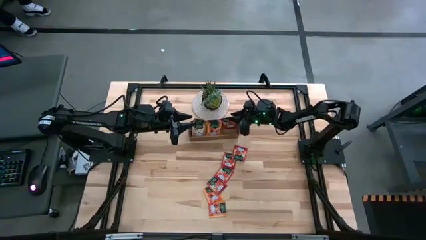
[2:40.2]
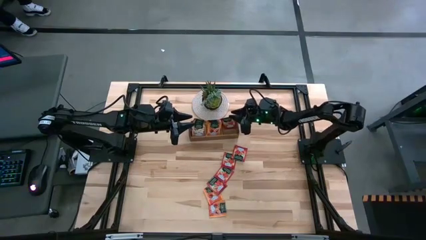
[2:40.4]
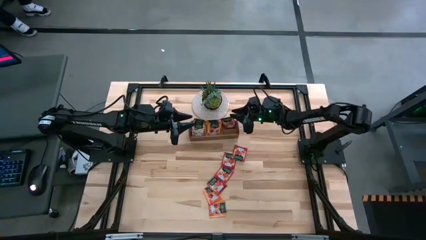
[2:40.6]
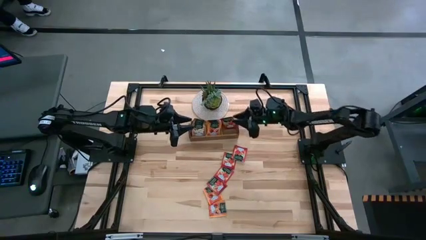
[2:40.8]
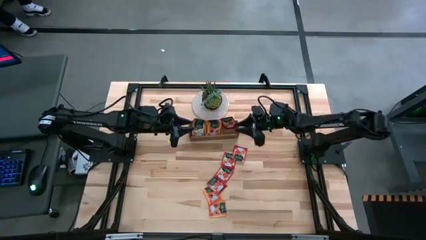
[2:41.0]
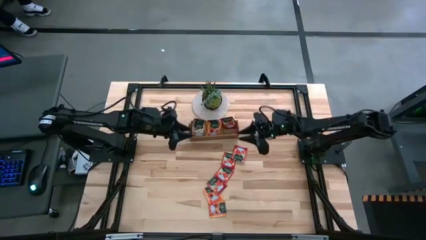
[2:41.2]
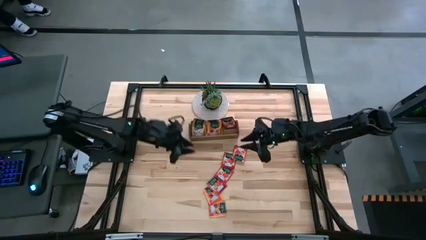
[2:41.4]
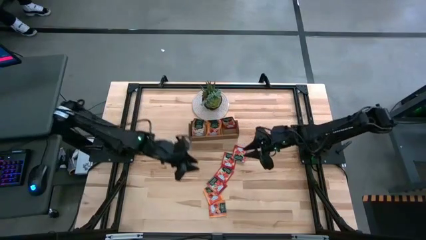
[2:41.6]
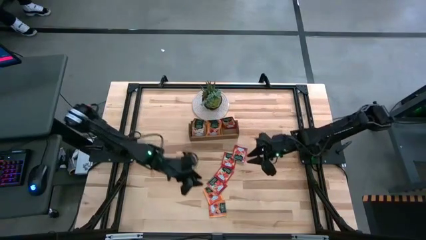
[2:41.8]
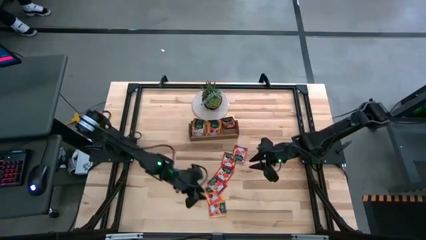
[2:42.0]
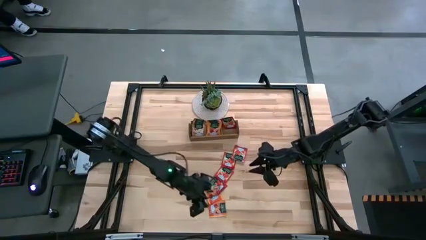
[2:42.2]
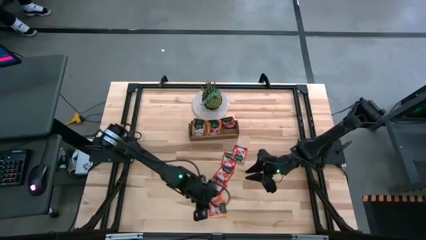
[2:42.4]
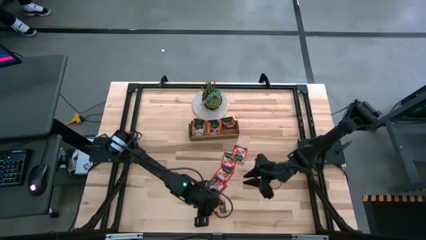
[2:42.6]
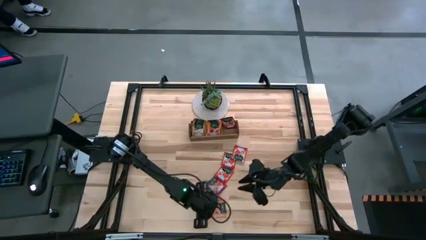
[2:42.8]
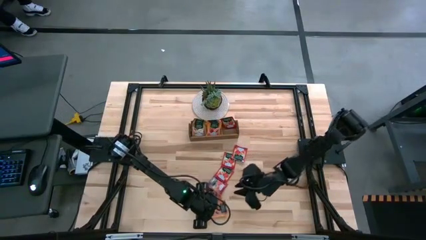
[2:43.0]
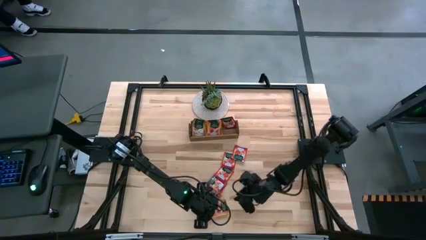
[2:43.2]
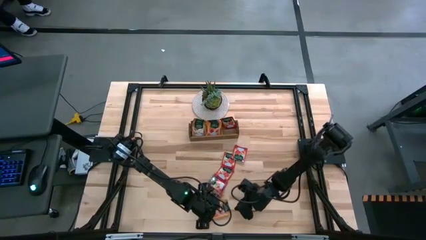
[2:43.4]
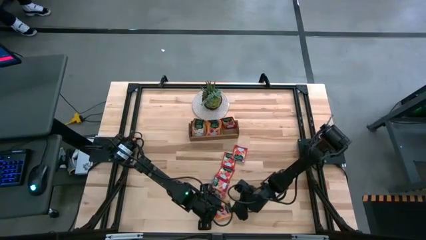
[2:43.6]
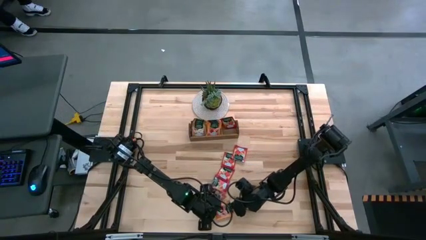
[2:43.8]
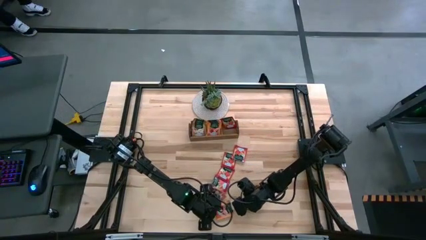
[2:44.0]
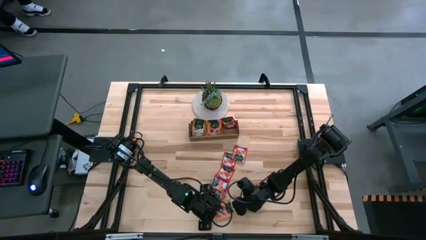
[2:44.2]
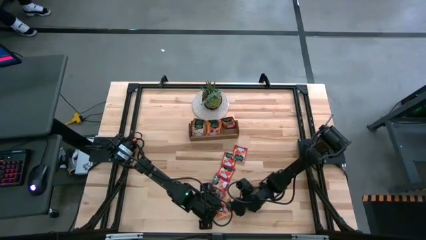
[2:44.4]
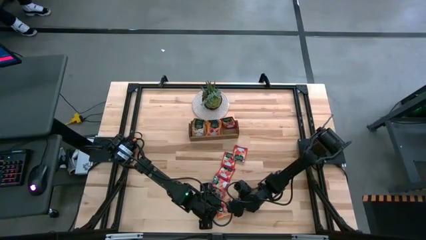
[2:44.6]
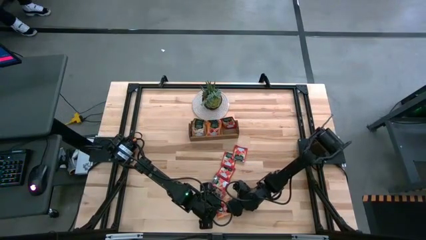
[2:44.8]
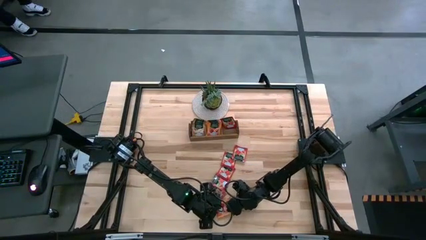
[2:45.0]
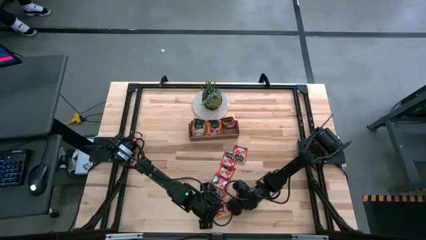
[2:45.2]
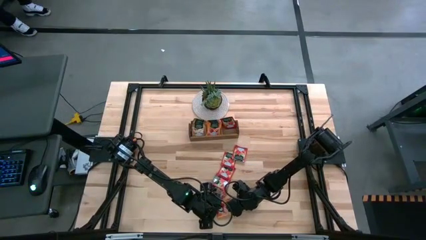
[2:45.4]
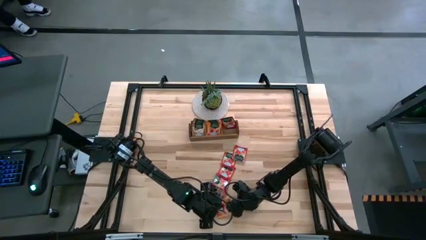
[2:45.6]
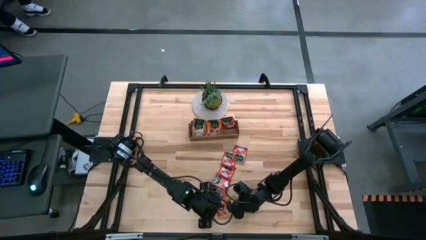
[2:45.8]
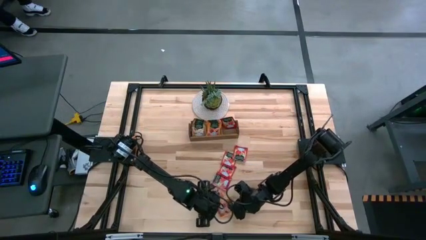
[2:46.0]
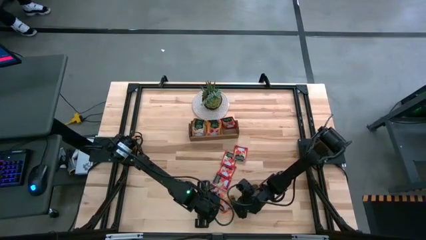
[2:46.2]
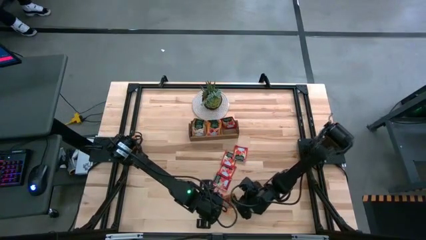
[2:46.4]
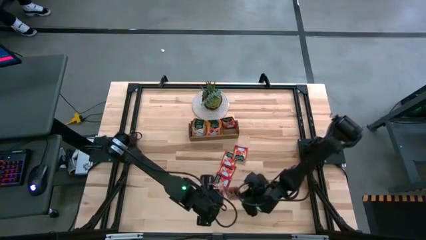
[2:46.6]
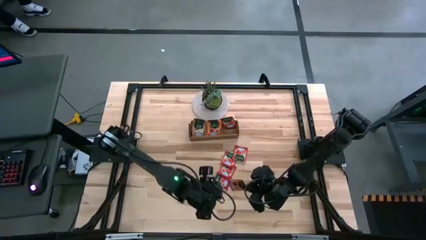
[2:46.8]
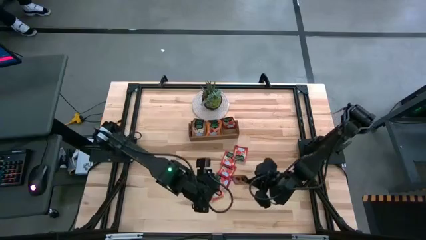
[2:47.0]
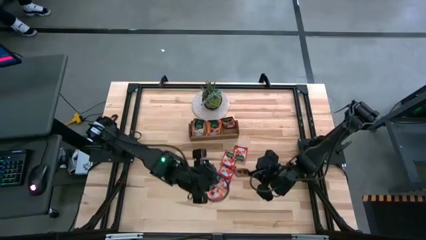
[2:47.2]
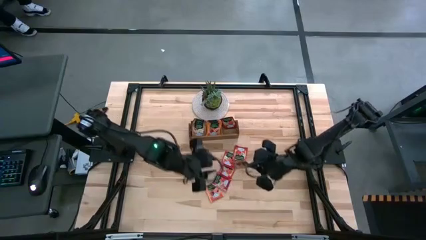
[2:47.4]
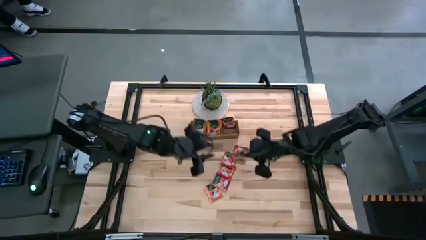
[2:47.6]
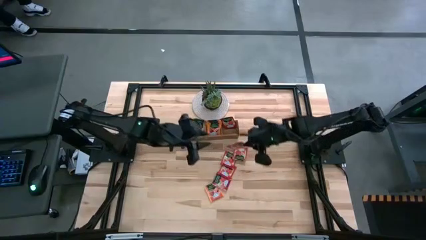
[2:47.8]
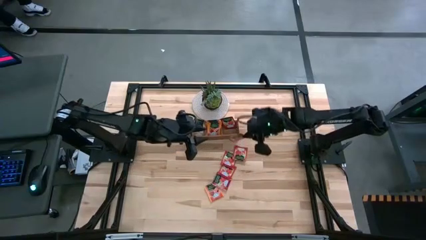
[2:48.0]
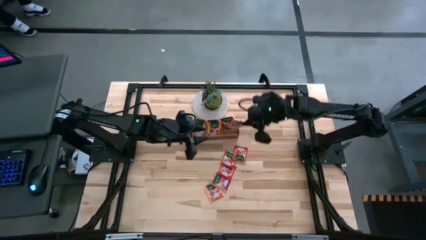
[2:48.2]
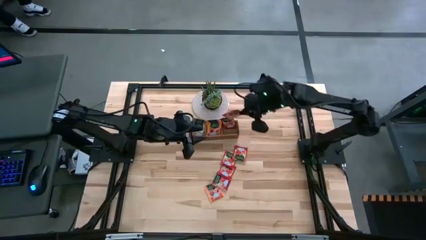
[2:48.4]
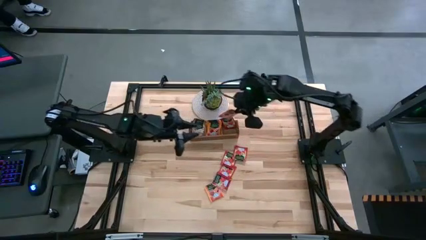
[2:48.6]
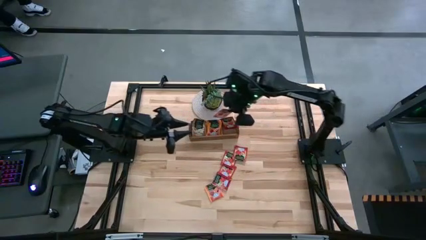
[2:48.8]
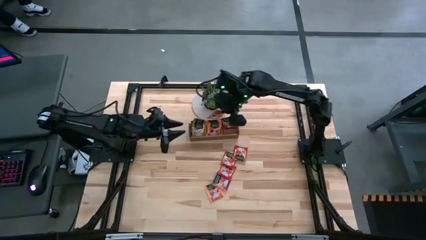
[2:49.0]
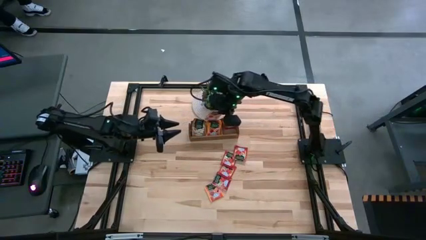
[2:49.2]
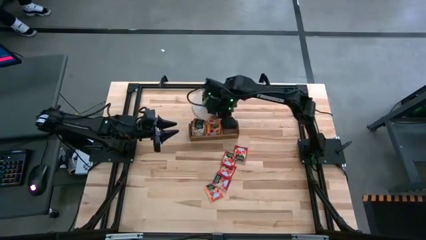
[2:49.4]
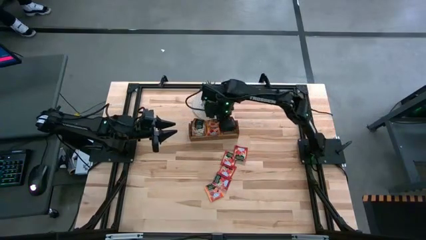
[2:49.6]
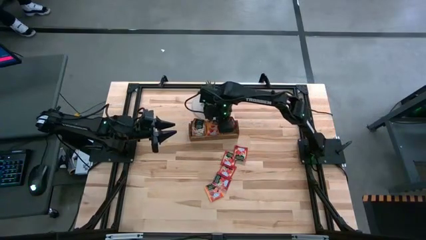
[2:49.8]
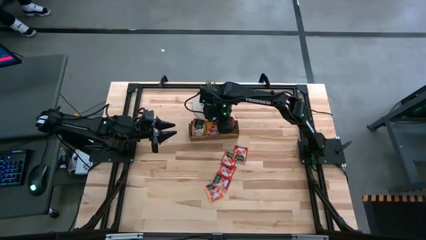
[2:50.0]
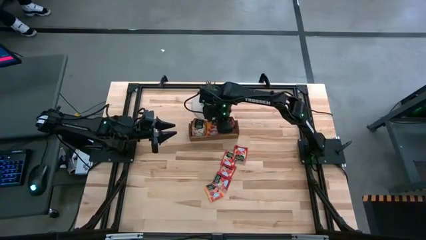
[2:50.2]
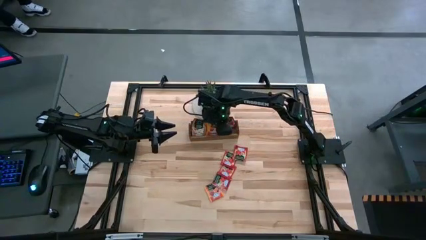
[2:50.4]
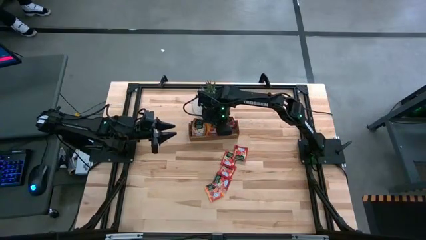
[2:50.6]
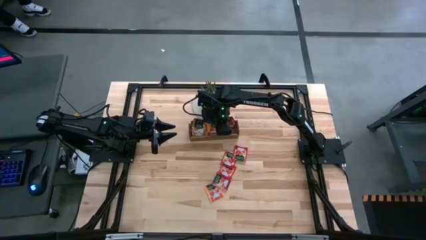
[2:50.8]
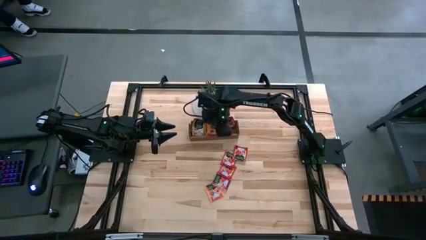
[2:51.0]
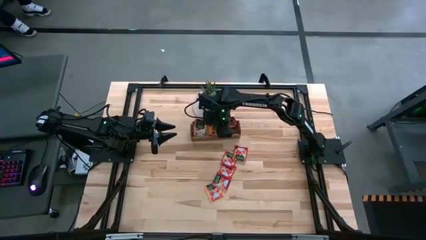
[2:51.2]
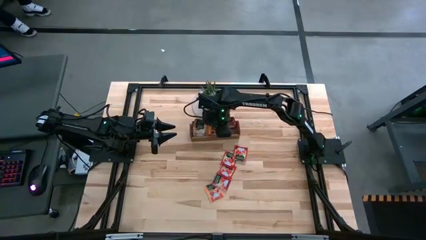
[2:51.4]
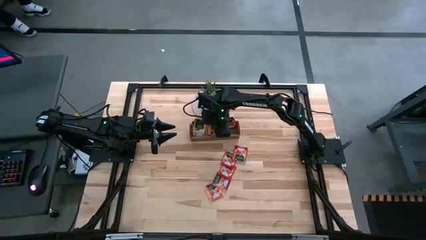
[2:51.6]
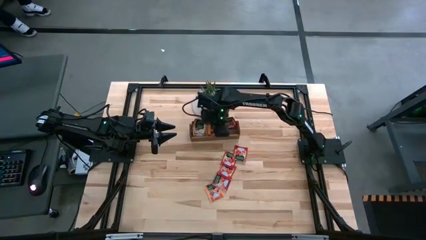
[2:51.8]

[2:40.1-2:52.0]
Task: Pick & Place Tea
Put the bottom orange tea bag into the middle section of the wooden organizer

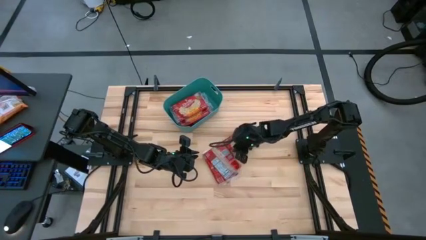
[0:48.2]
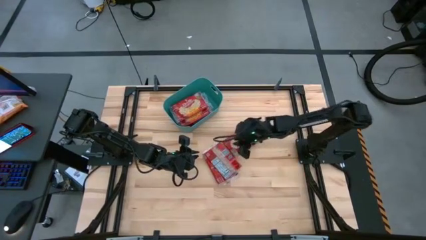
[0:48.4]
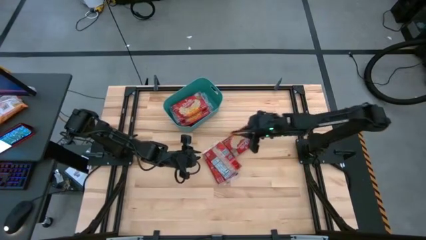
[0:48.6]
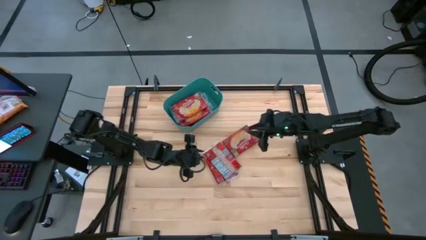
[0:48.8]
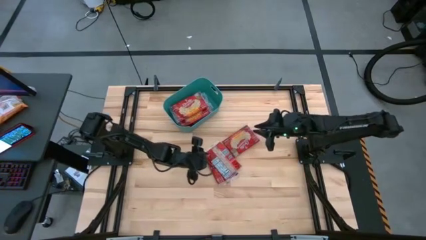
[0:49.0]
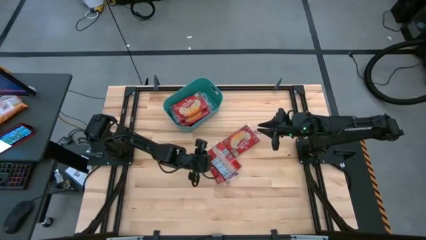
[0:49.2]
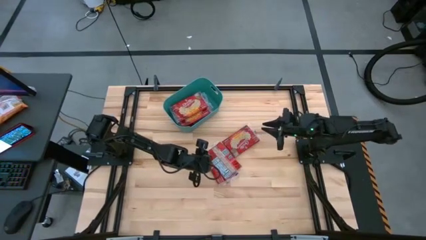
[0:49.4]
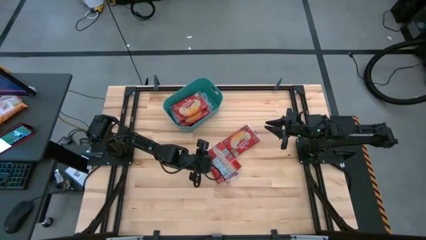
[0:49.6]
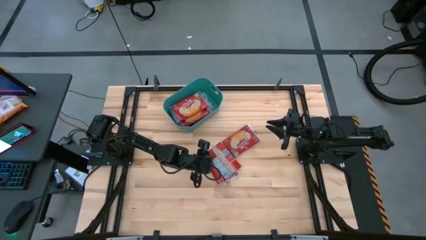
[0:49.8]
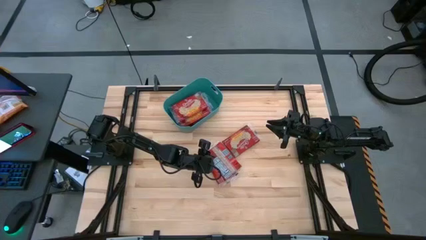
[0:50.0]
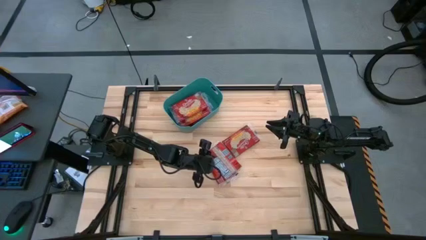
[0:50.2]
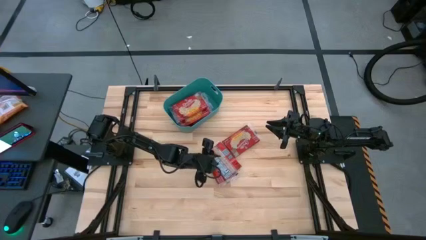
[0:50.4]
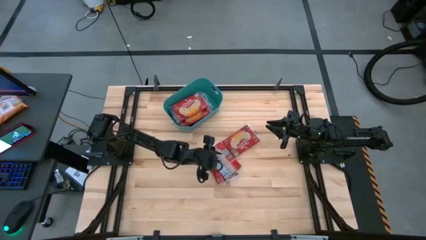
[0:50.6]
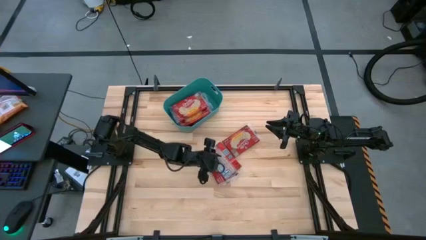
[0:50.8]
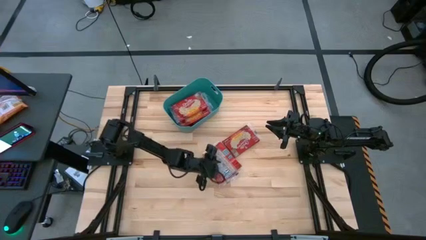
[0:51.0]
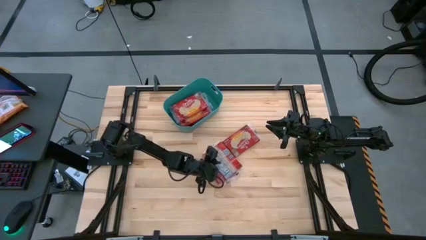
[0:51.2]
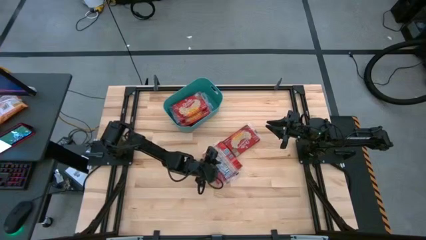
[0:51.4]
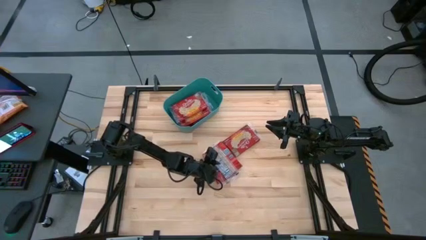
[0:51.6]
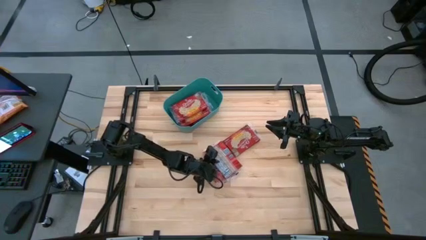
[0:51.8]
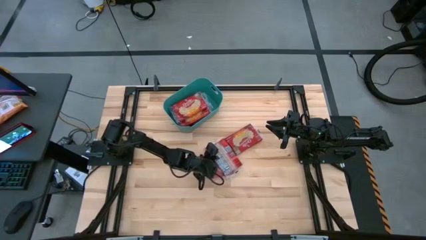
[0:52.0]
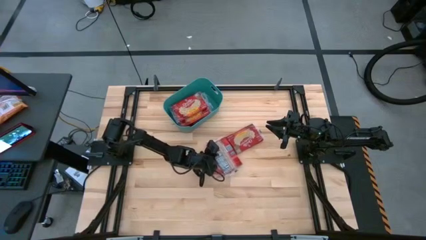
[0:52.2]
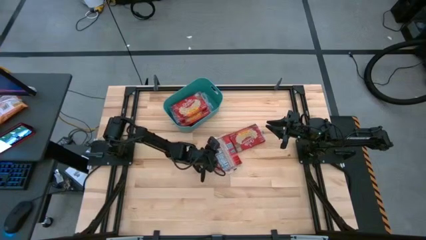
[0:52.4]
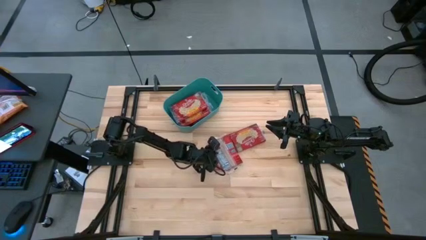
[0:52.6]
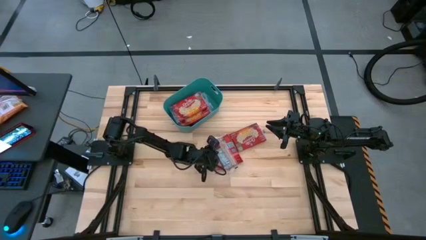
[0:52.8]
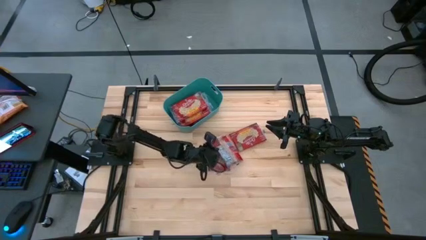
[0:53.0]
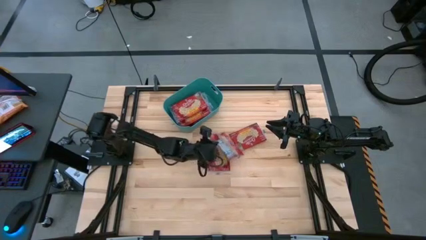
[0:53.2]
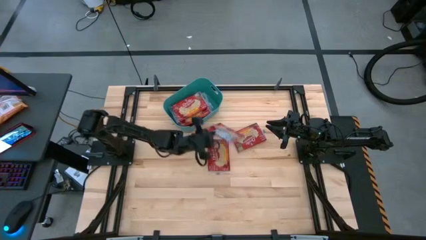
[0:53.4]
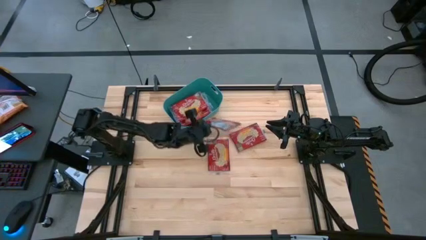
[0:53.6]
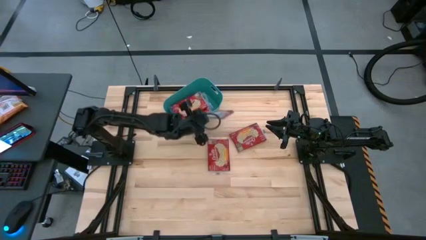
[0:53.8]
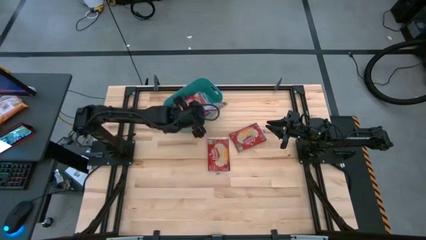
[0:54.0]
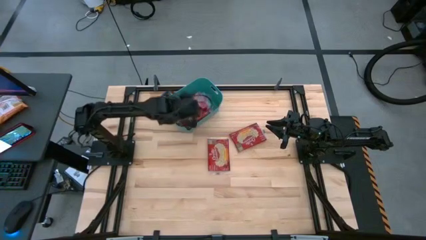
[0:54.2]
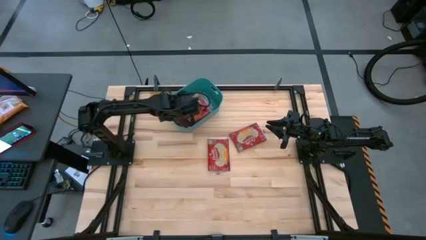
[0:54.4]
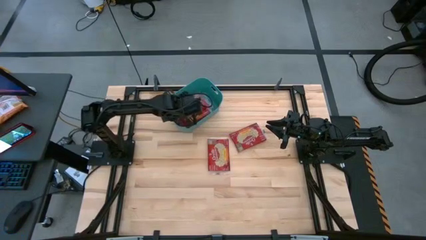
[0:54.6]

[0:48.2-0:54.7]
Task: Sort popcorn bags into baskets
Put the red popcorn bag into the green bin
